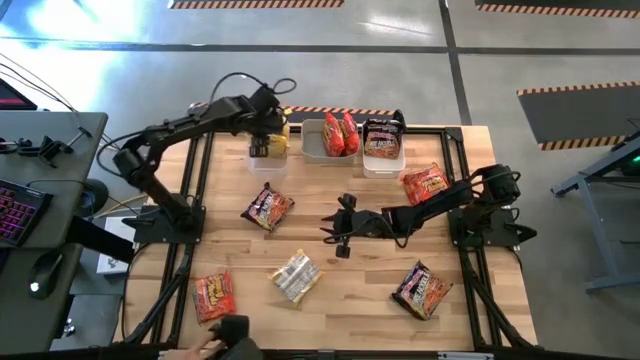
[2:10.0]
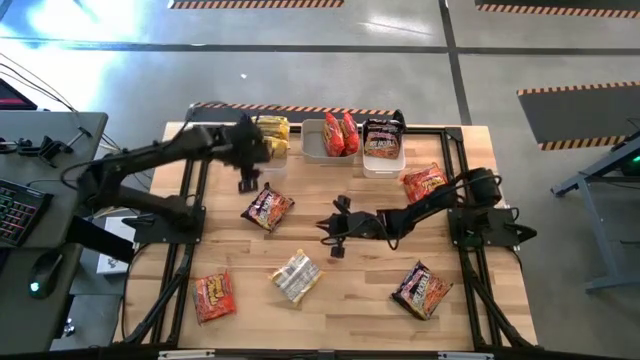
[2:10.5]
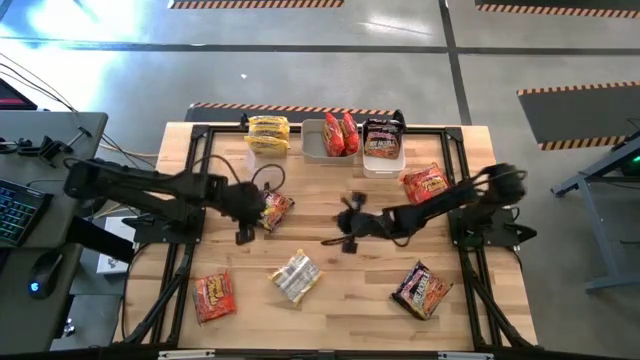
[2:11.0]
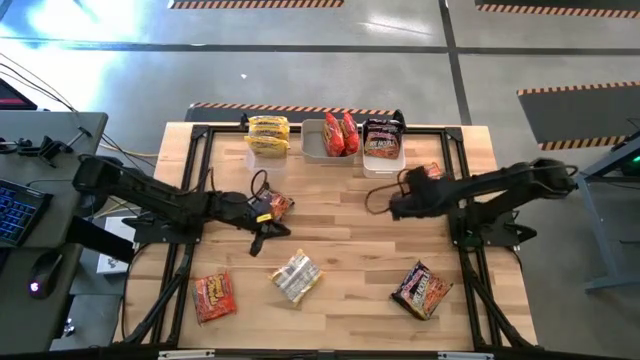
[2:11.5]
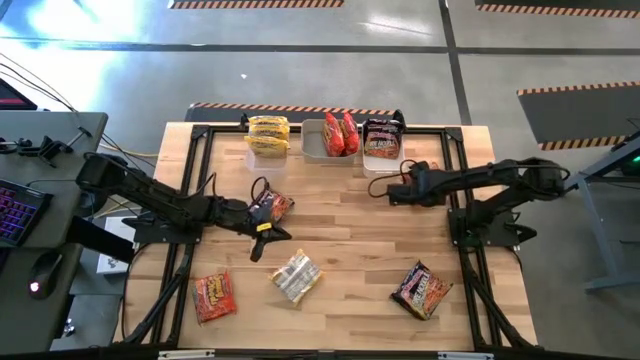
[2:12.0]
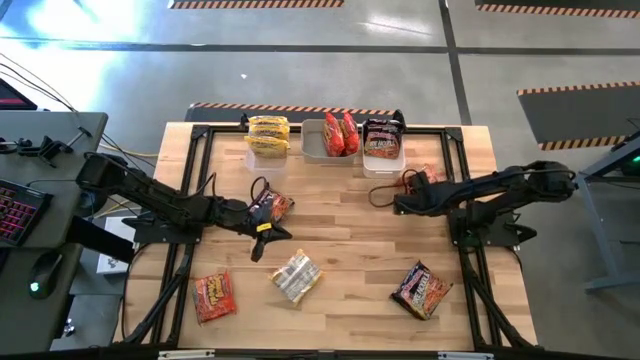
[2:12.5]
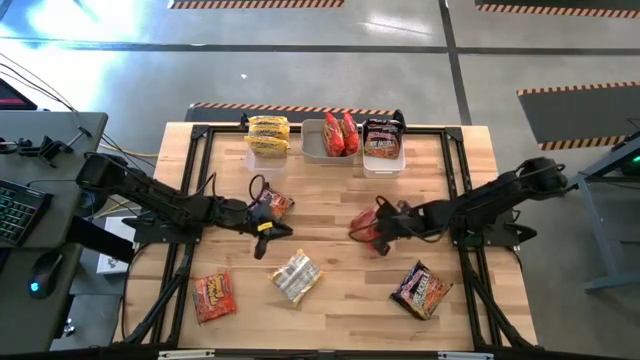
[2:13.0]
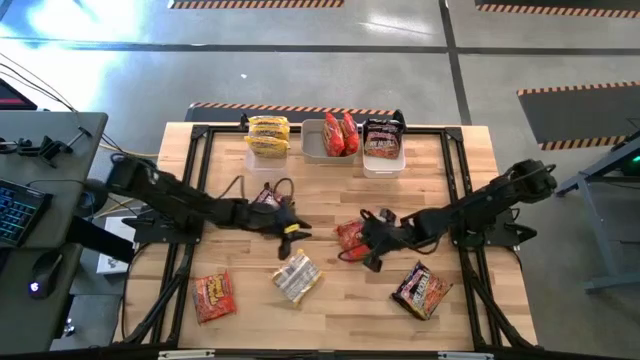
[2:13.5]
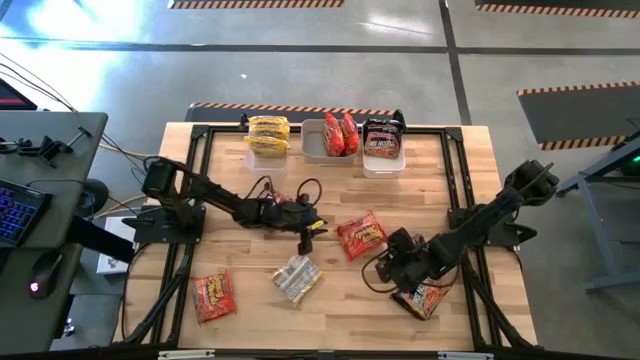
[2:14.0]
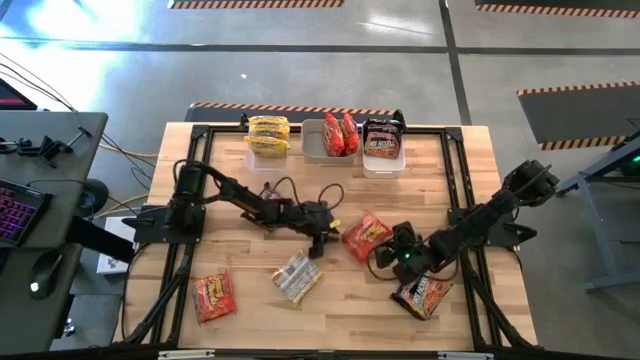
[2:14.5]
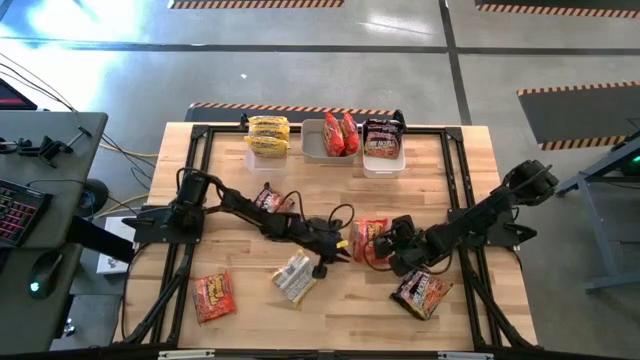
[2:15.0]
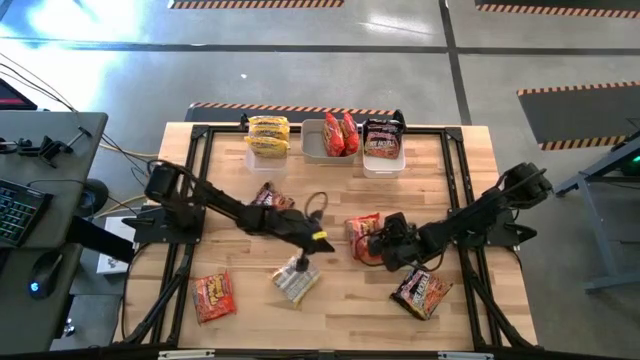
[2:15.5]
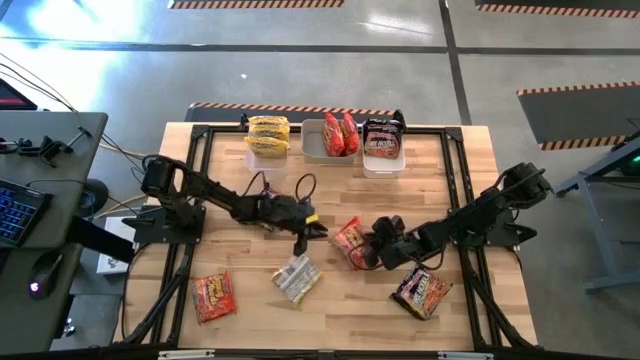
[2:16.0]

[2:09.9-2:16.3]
Task: Sort Maruchan noodles
Put the top orange noodle pack into the gray bin

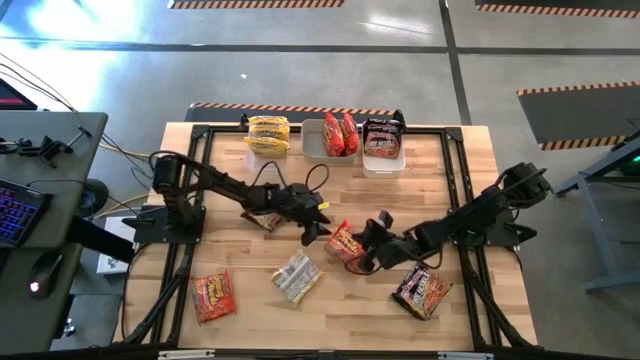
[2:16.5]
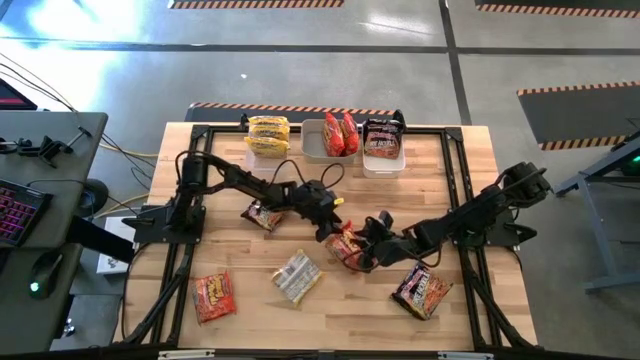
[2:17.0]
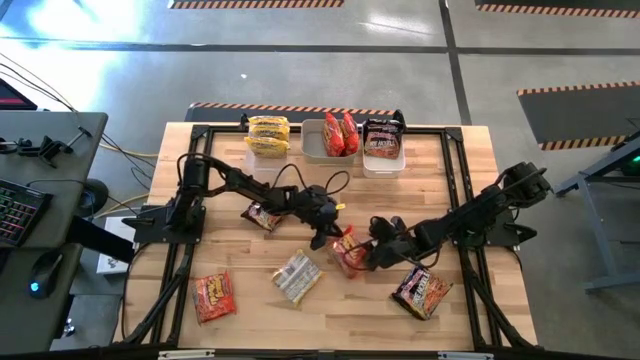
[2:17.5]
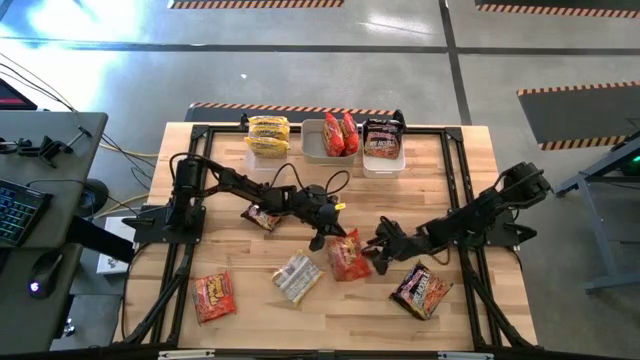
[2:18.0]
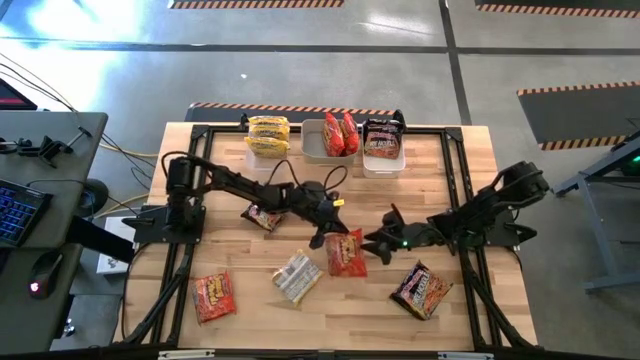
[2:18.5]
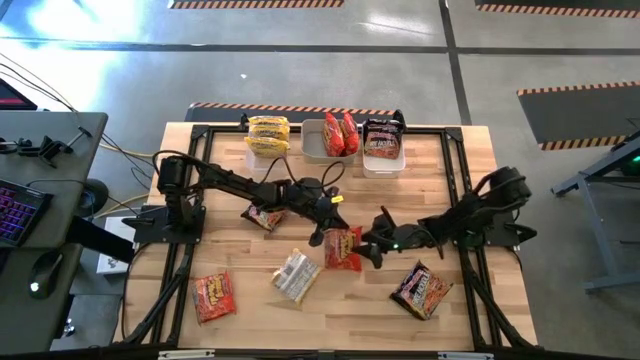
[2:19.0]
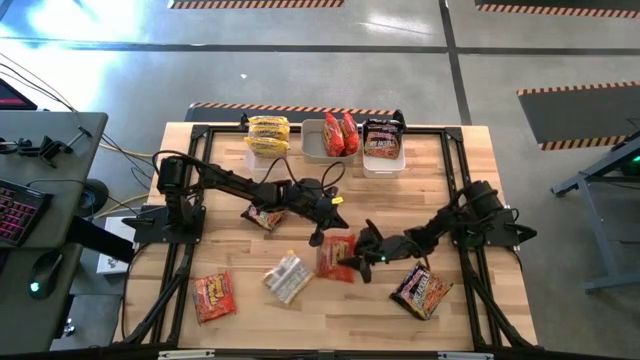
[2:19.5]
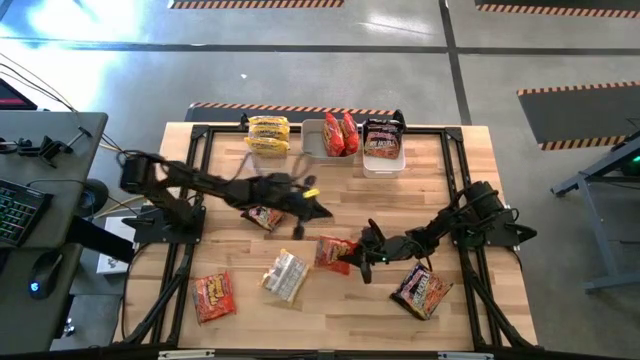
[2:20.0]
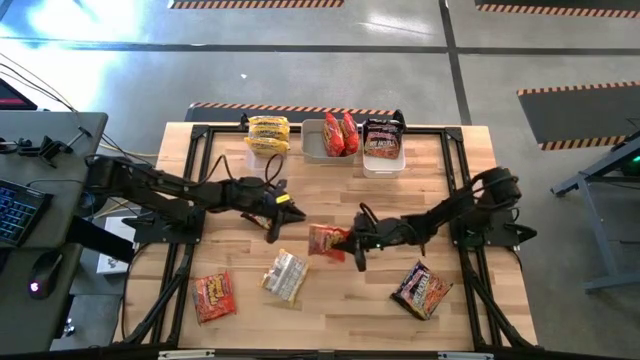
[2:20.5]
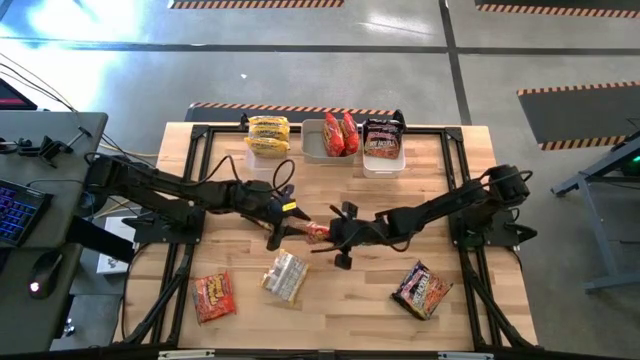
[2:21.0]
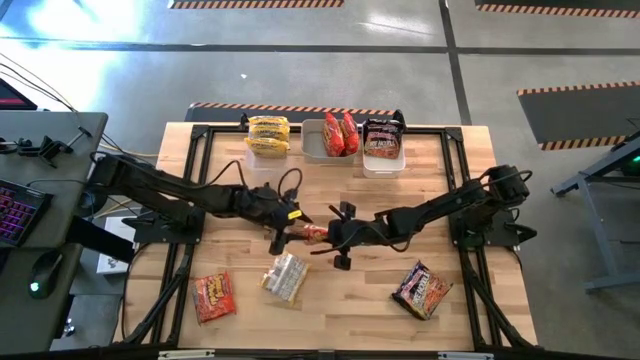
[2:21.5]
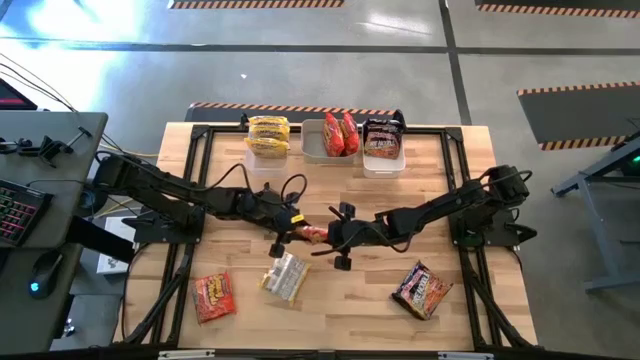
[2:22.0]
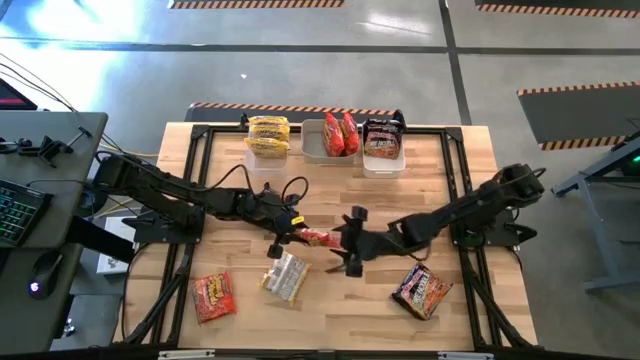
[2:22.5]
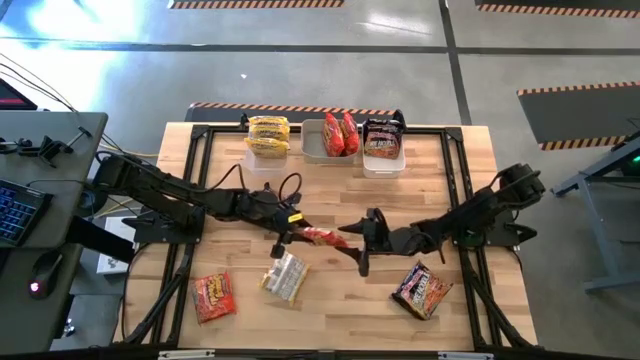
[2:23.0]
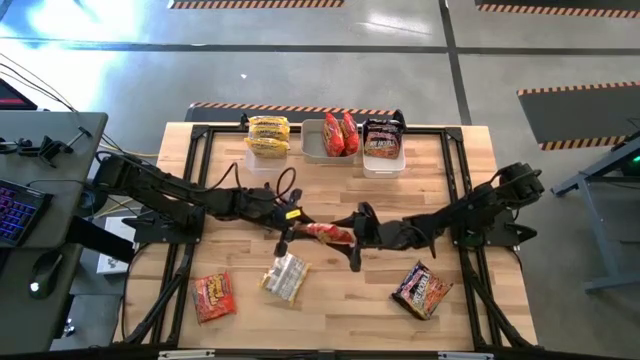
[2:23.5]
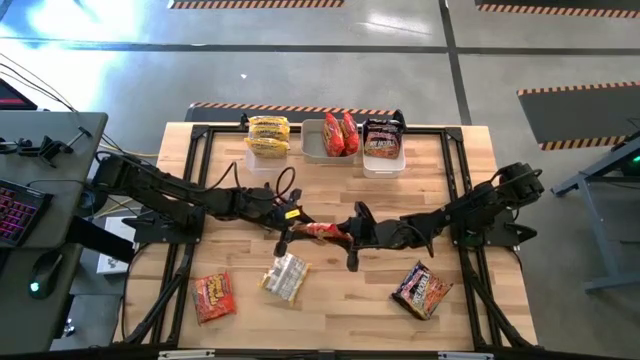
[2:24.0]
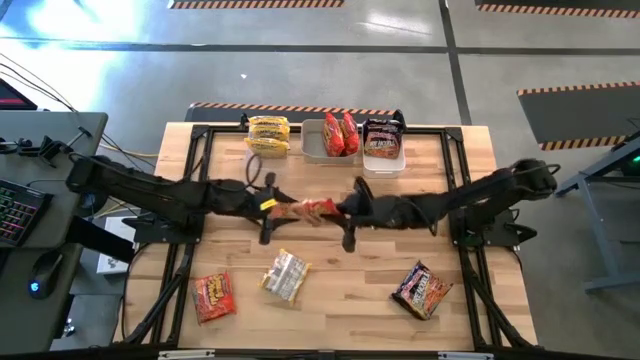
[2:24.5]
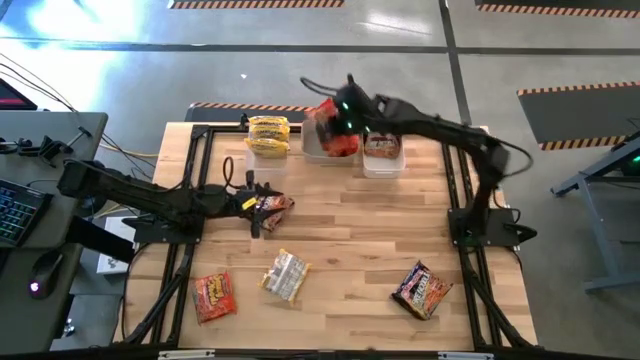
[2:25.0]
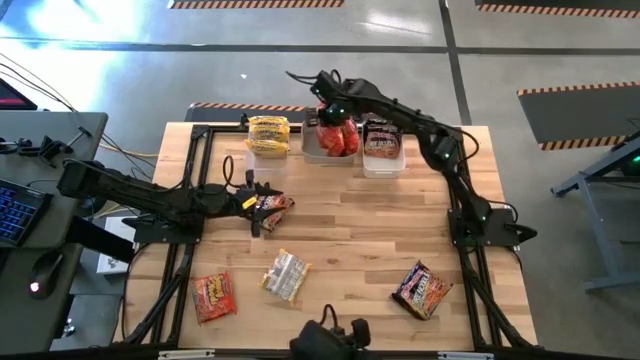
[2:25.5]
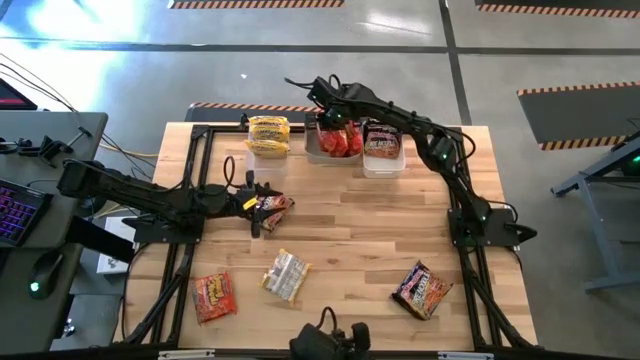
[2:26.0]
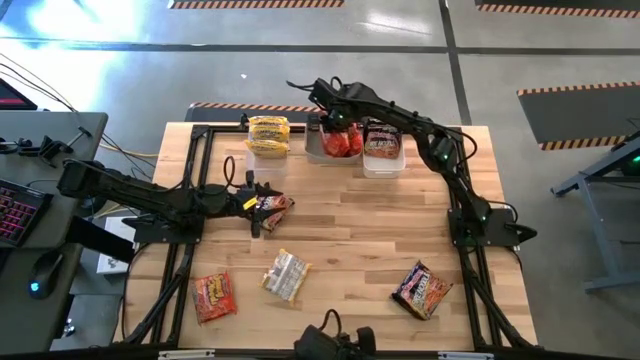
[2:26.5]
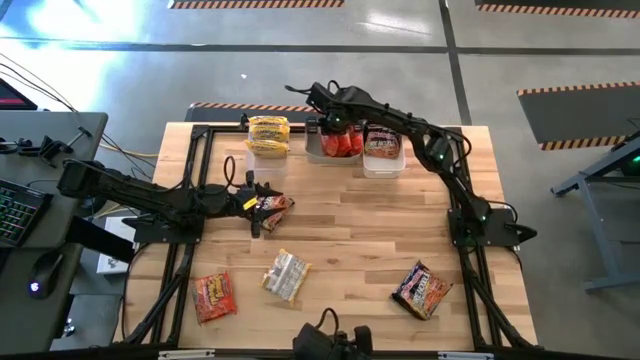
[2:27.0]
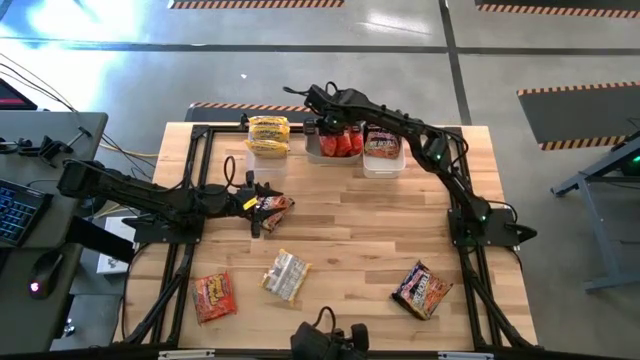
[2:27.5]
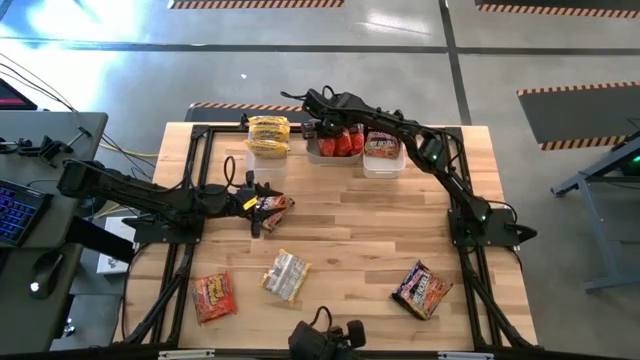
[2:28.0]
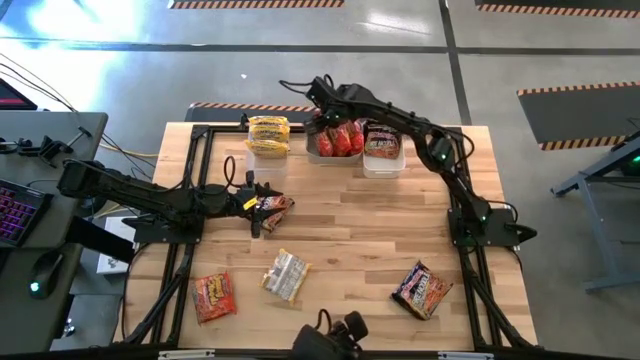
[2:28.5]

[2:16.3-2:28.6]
Put the top orange noodle pack into the gray bin

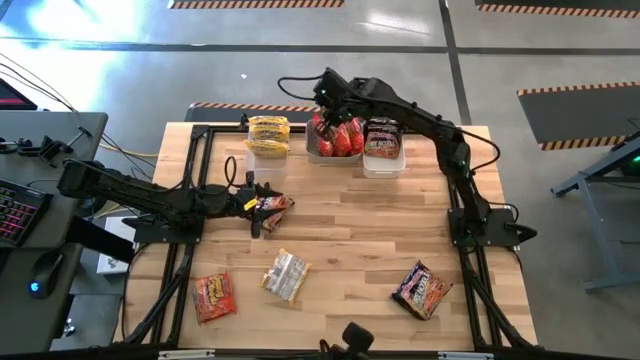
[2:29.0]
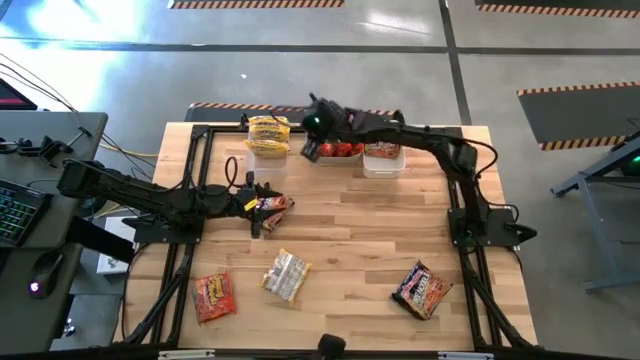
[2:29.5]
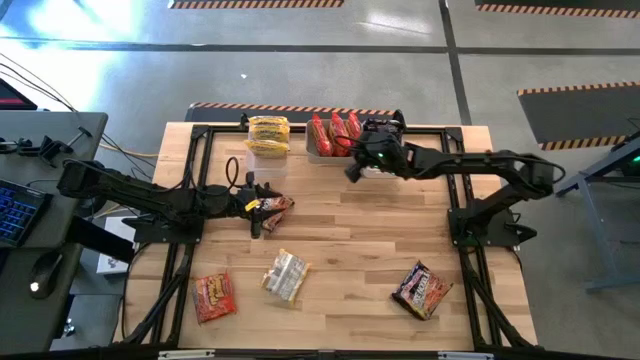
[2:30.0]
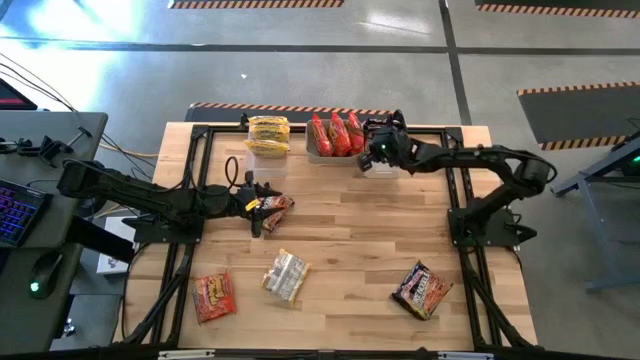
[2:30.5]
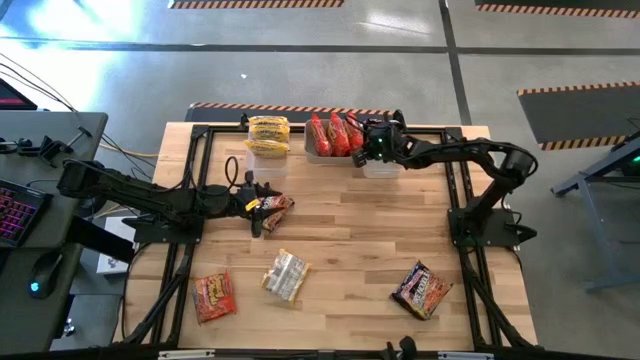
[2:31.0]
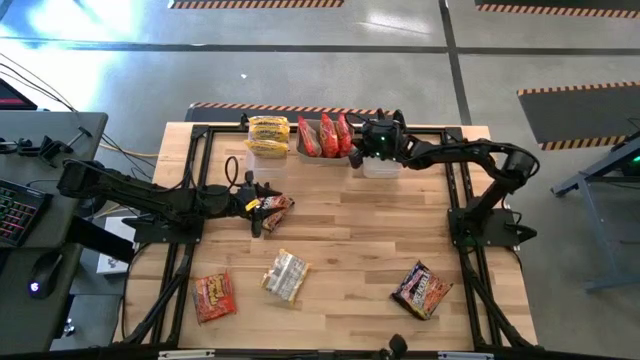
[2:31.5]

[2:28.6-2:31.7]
Adjust the gray bin on the table
